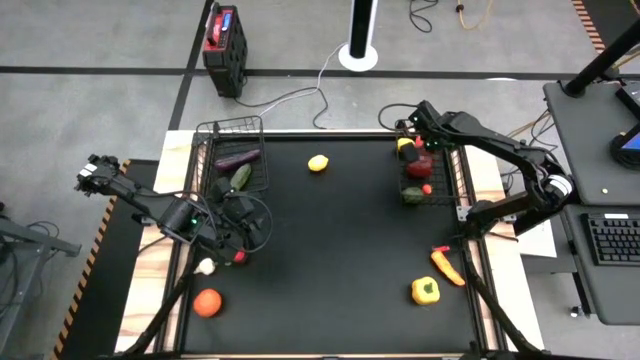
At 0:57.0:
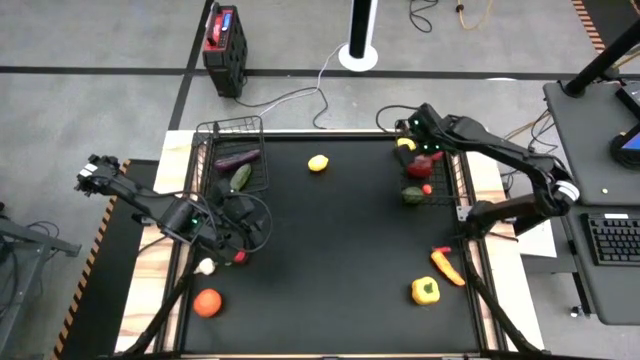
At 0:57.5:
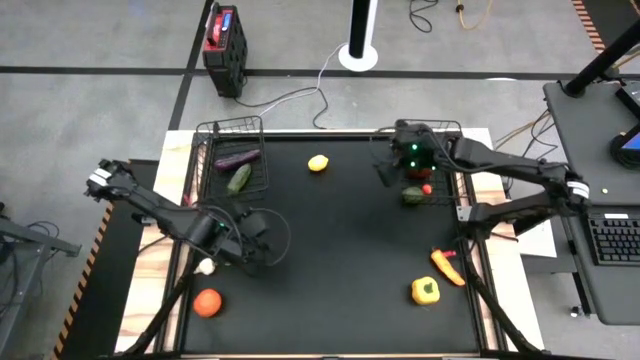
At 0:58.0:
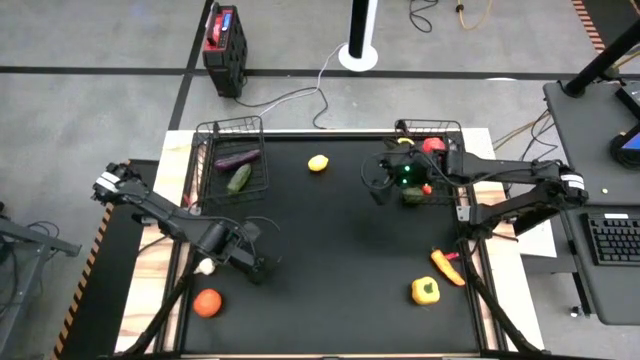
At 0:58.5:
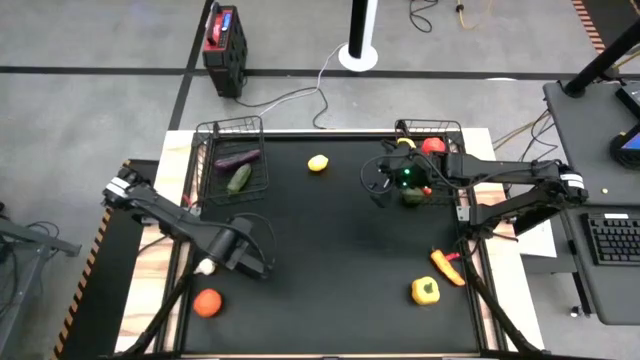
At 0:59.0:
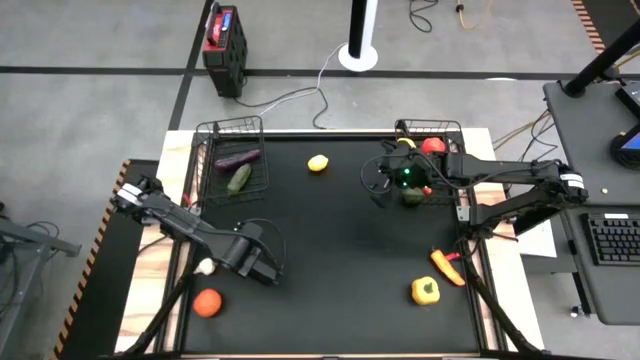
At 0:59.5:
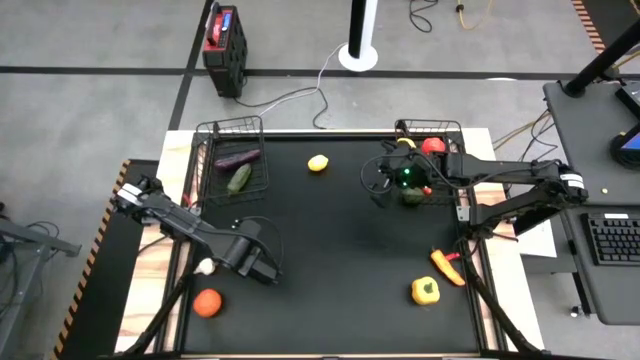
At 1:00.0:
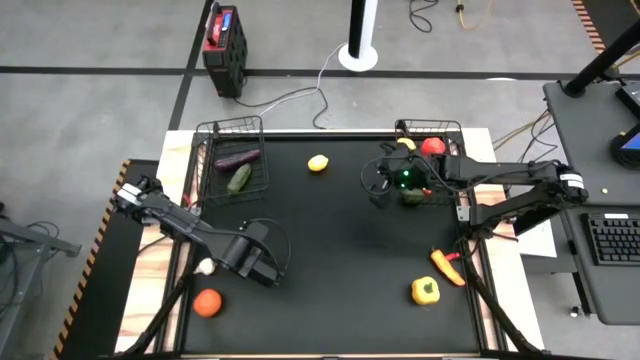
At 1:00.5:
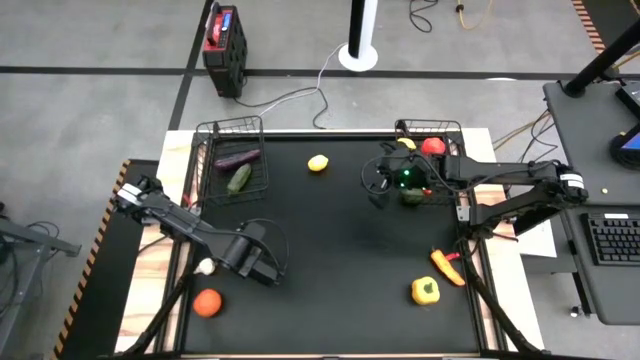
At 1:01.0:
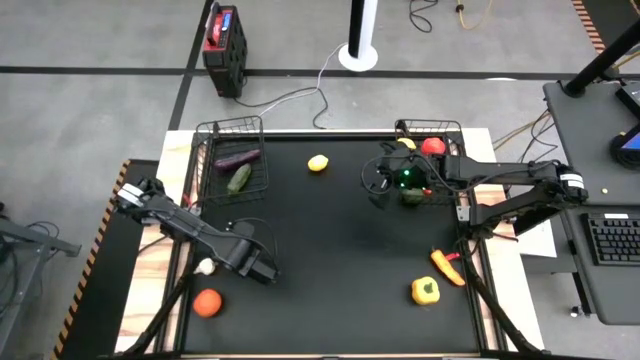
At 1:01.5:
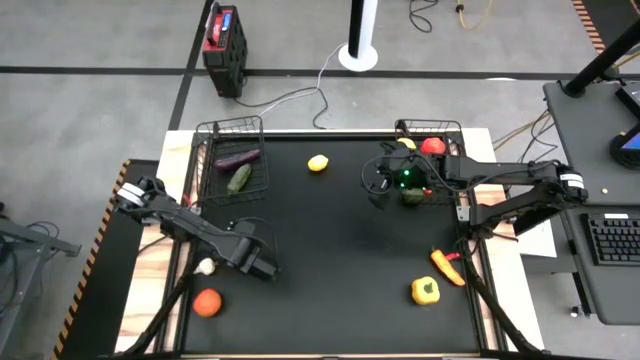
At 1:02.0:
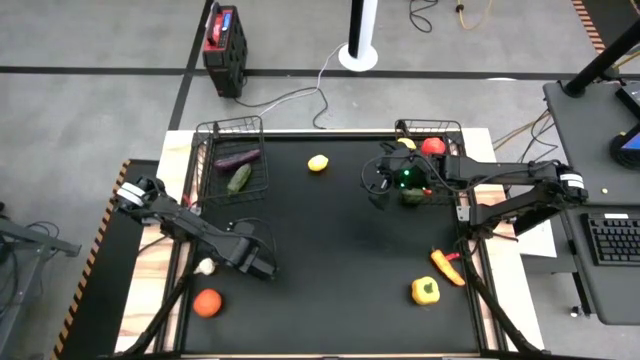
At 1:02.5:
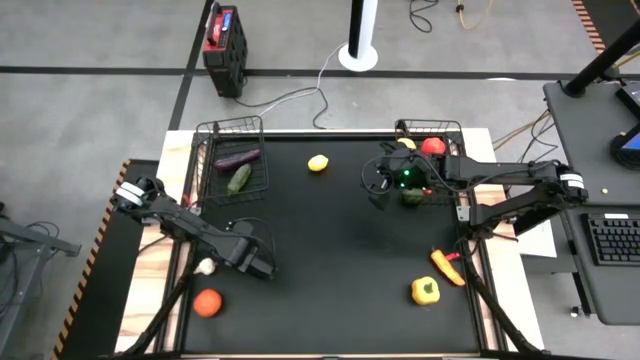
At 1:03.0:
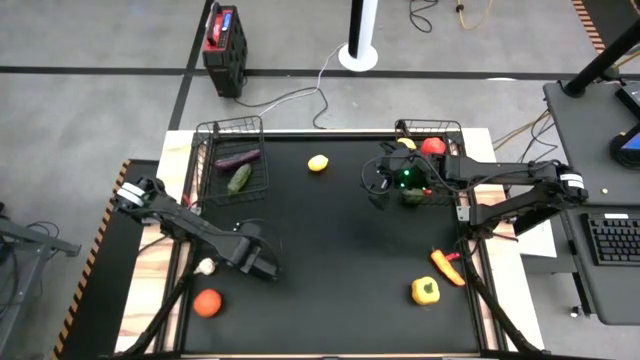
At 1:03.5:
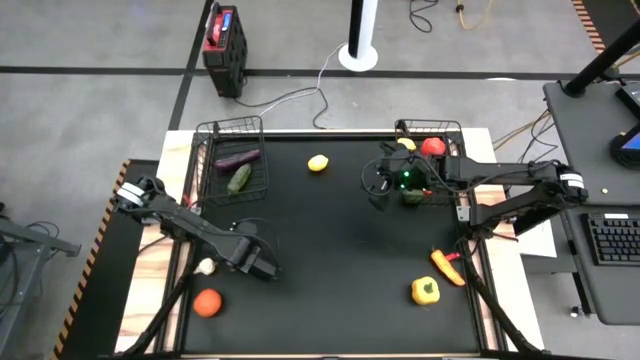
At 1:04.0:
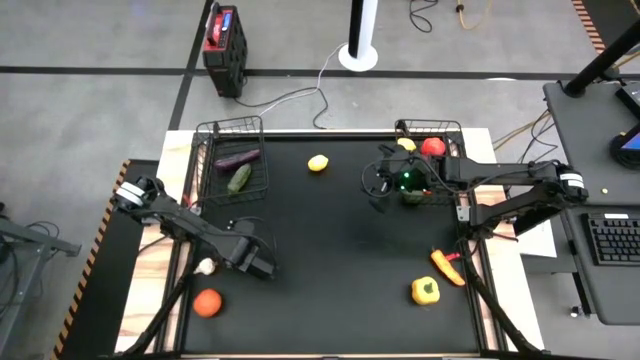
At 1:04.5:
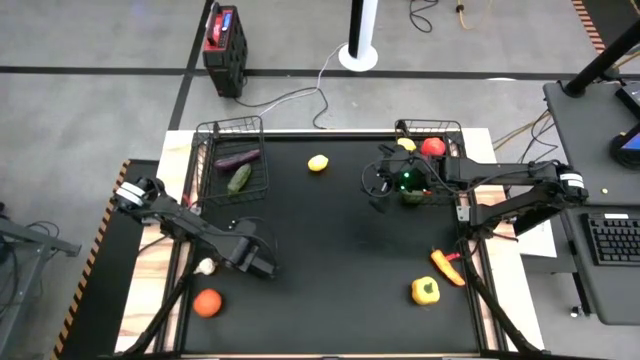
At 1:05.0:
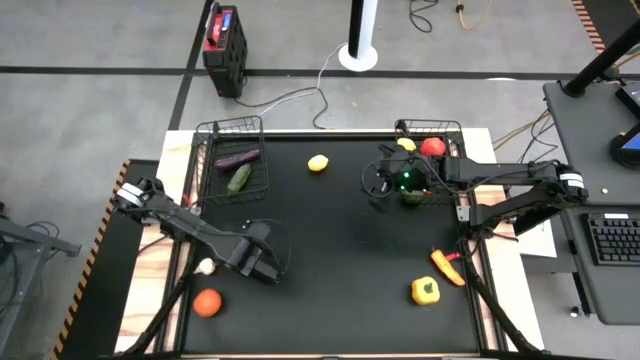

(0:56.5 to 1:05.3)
Task: Sort produce into baskets
Put the red bell pepper into the left wire basket

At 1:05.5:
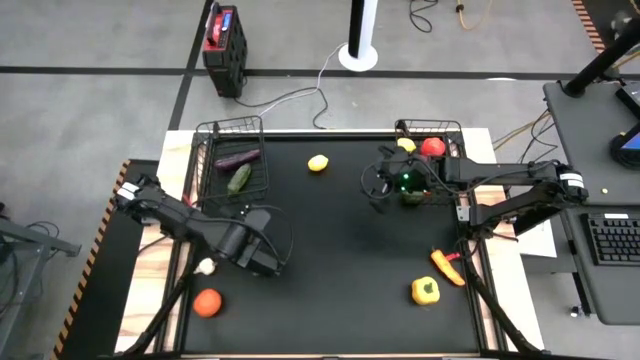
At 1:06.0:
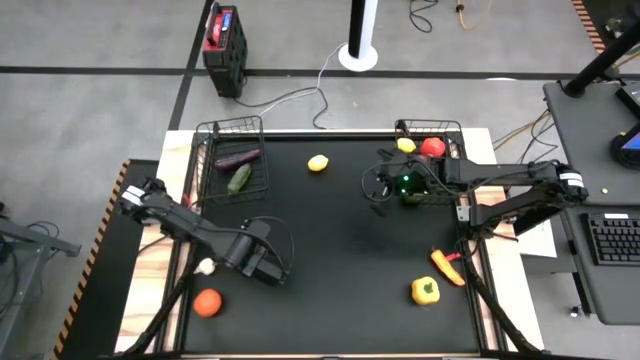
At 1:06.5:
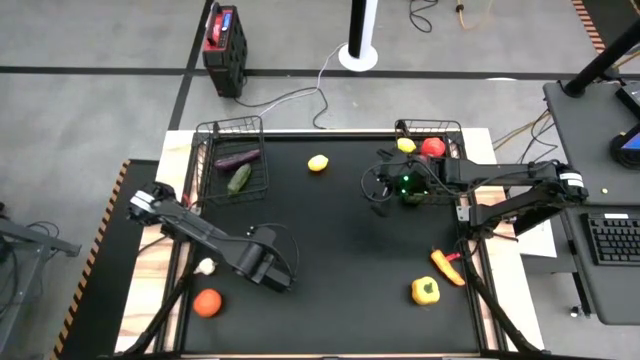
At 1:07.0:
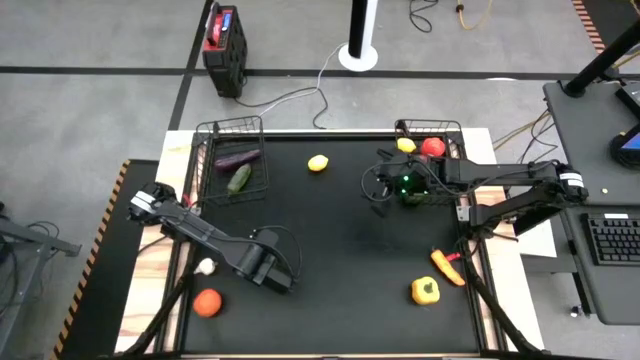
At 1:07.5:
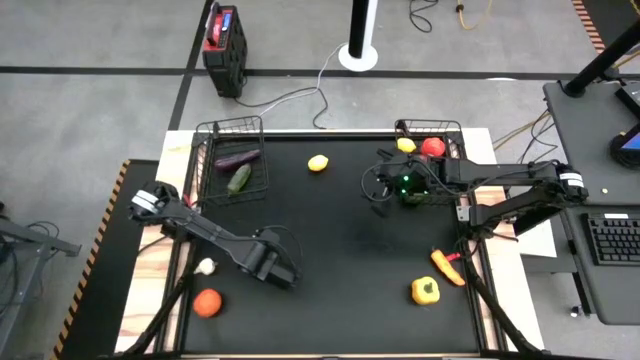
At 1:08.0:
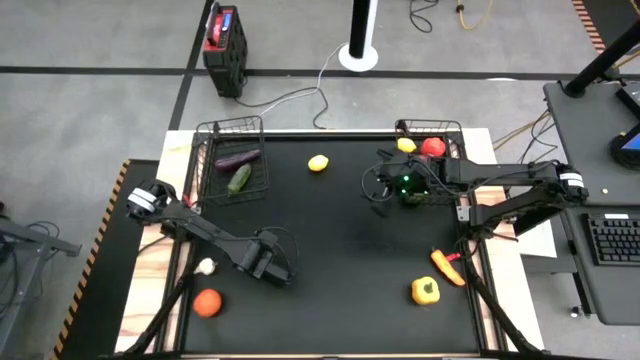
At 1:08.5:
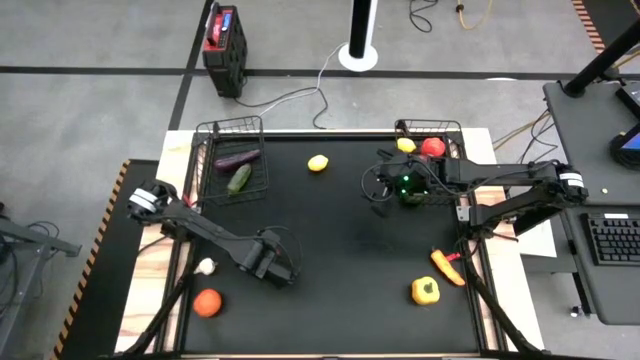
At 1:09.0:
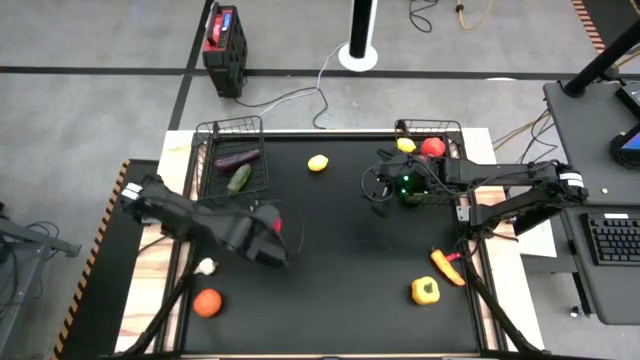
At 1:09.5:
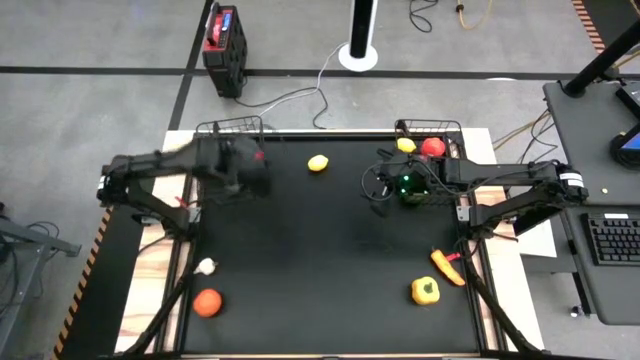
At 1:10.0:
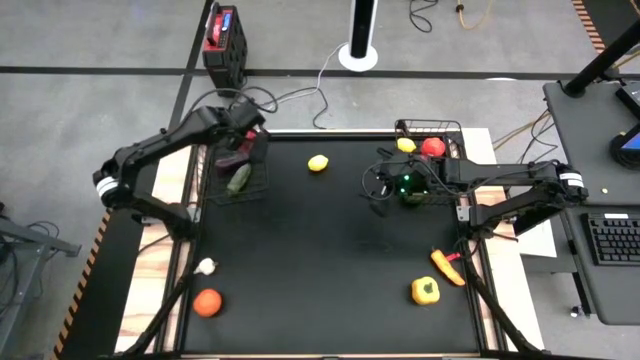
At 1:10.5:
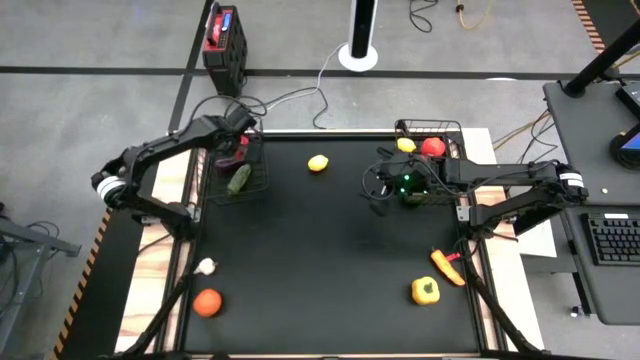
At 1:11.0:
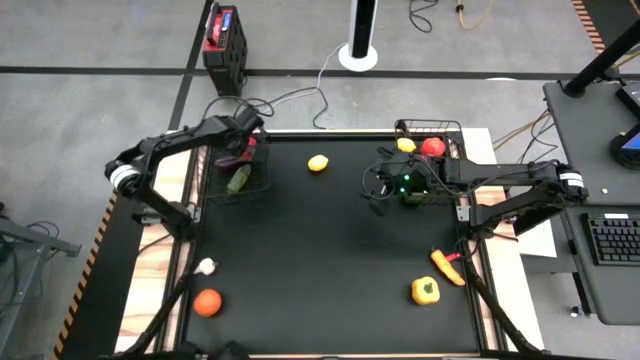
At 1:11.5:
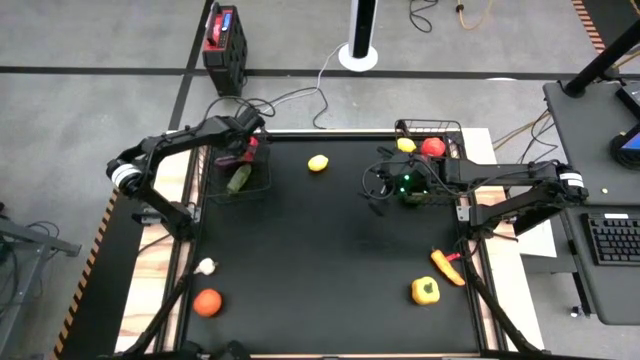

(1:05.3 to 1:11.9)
Put the red bell pepper into the left wire basket

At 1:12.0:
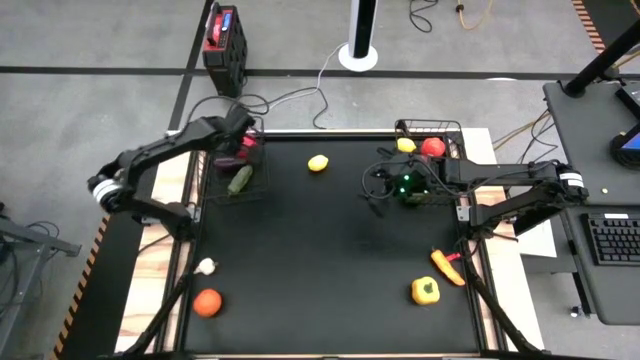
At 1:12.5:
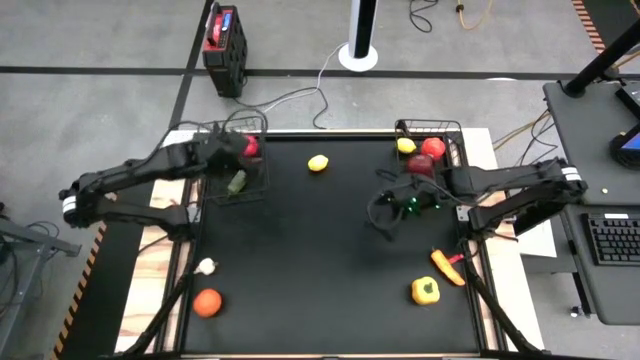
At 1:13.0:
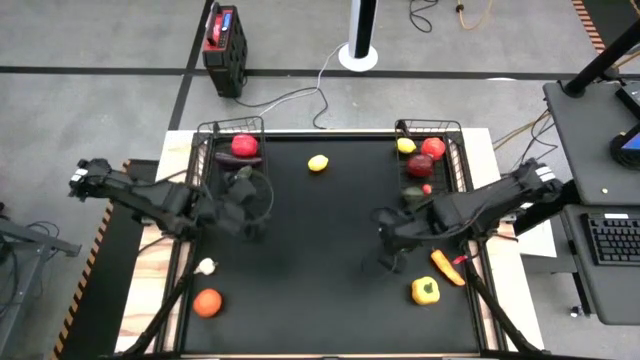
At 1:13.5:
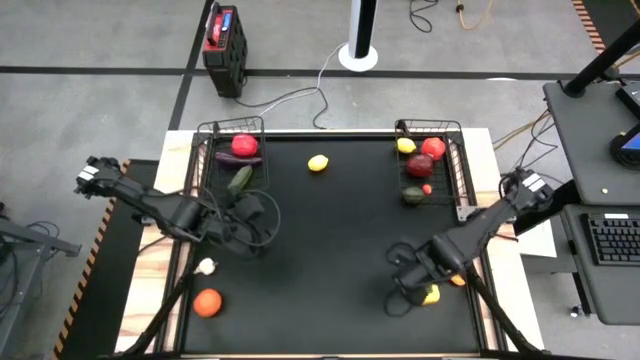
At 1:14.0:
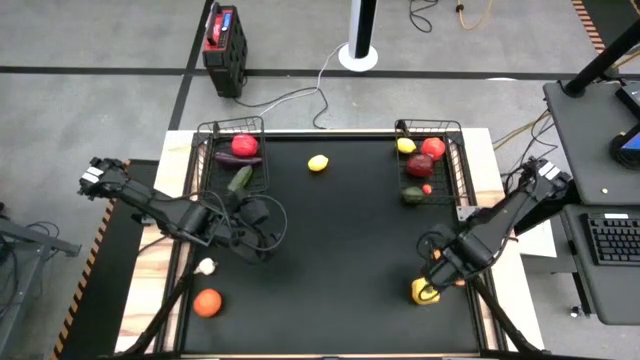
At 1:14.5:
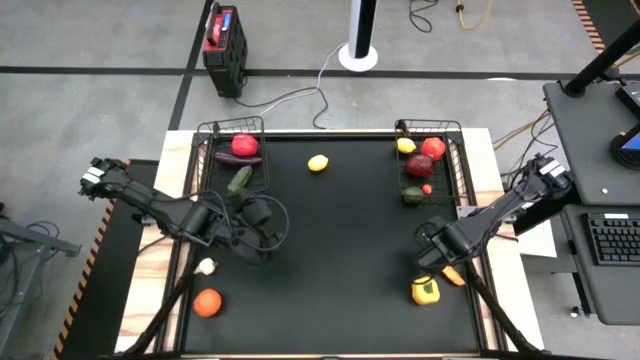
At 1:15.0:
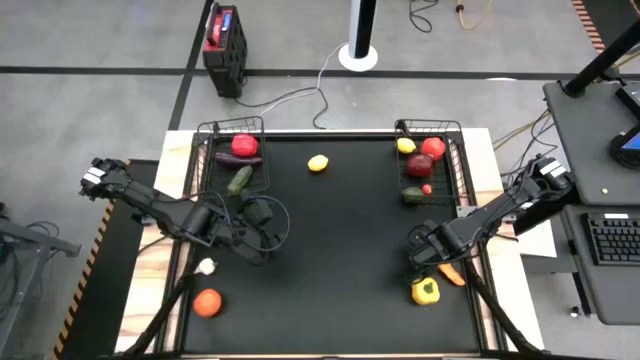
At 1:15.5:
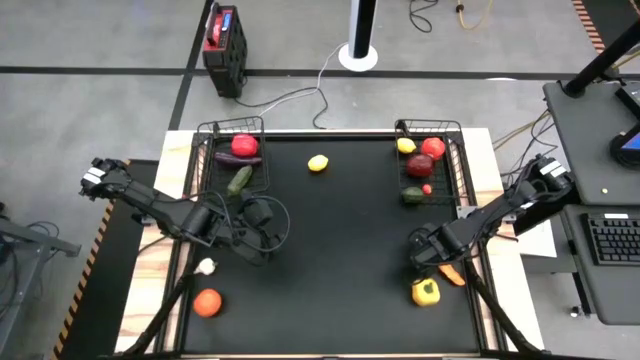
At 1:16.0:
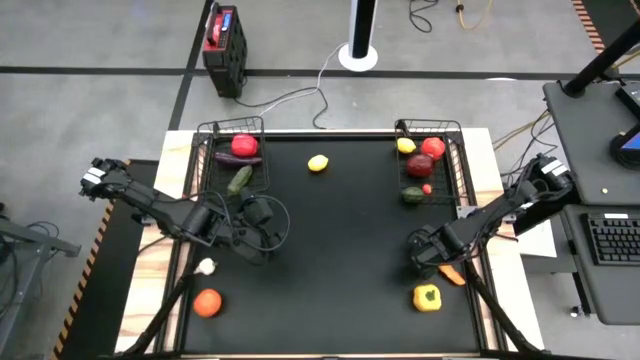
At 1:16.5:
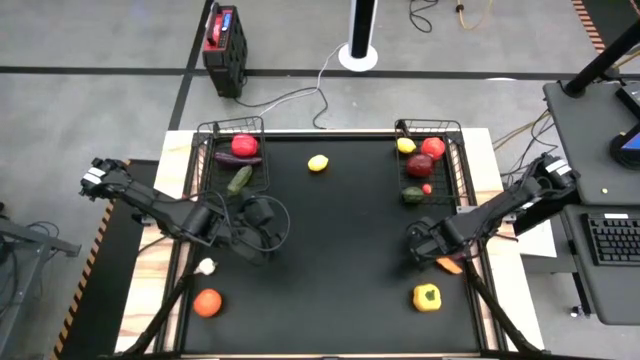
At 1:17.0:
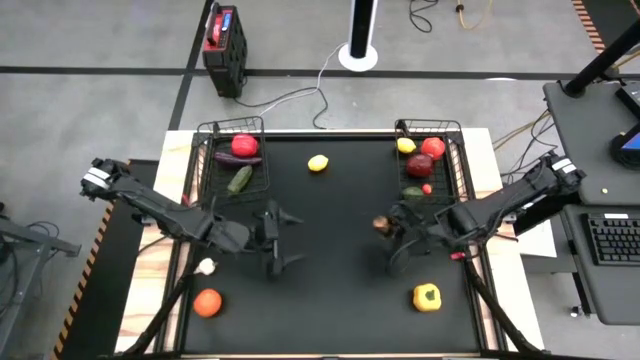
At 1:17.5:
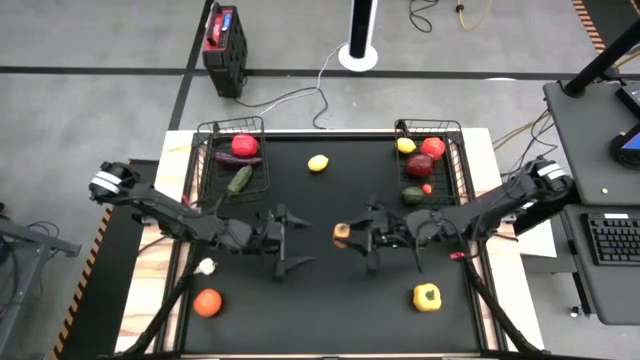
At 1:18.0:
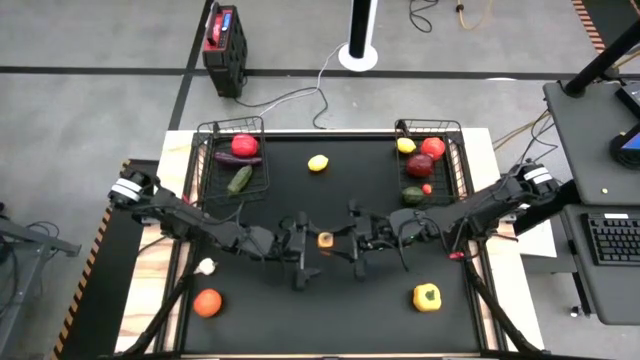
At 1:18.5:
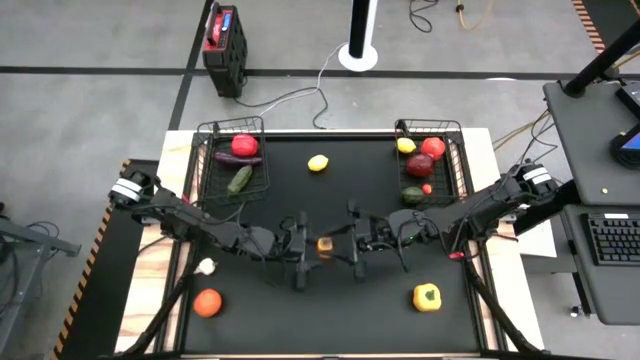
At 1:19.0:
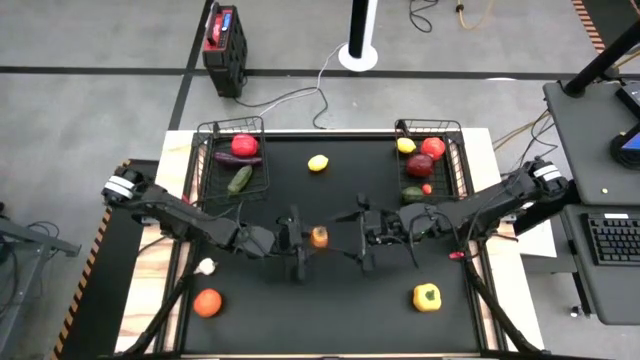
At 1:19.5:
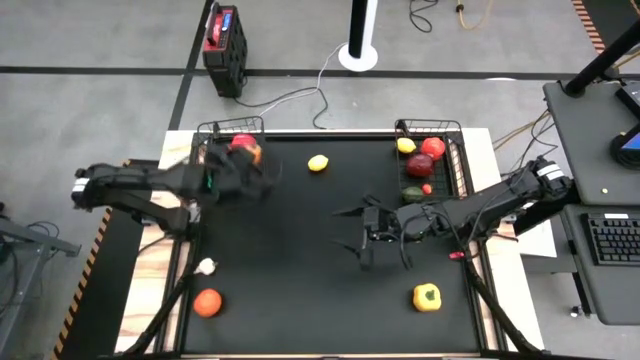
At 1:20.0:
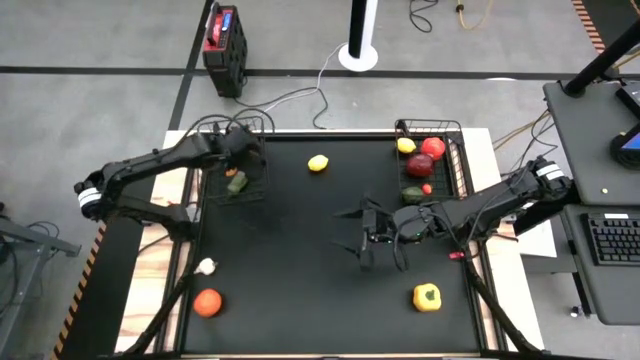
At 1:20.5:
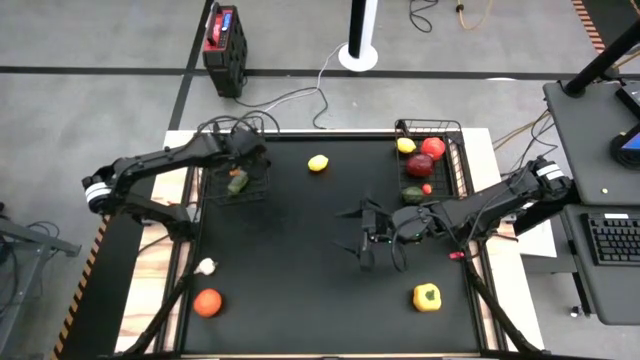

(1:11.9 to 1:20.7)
Put the yellow chili pepper into the left wire basket
